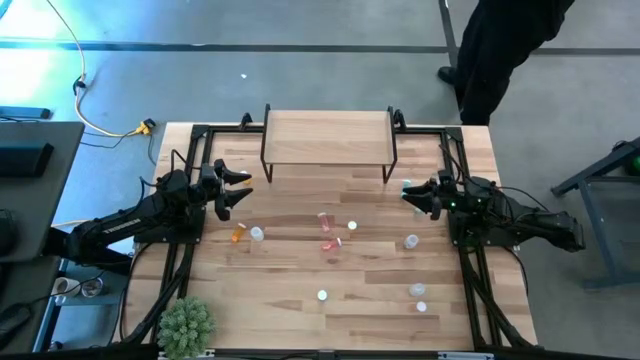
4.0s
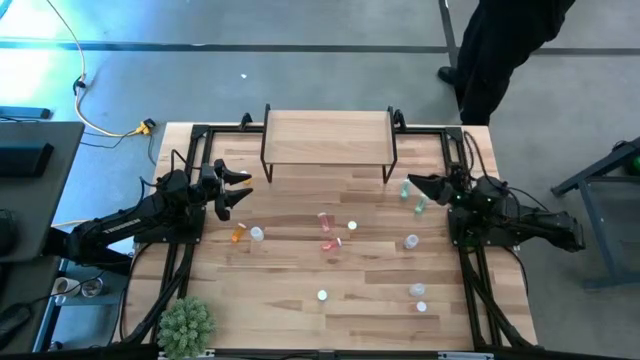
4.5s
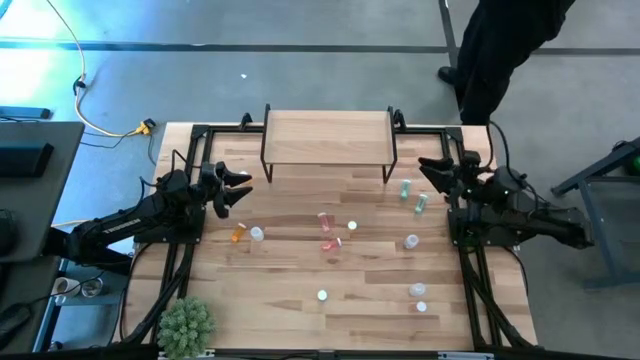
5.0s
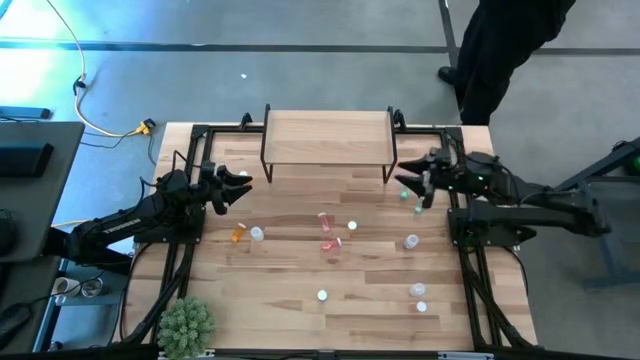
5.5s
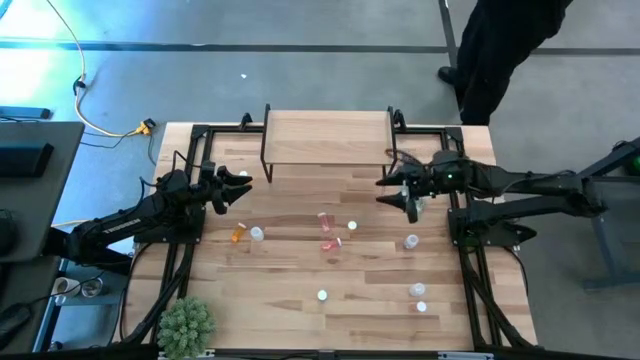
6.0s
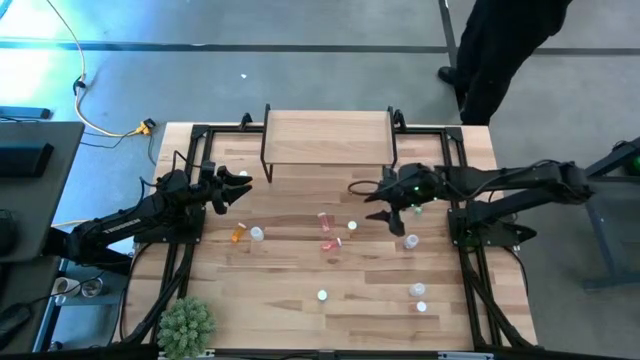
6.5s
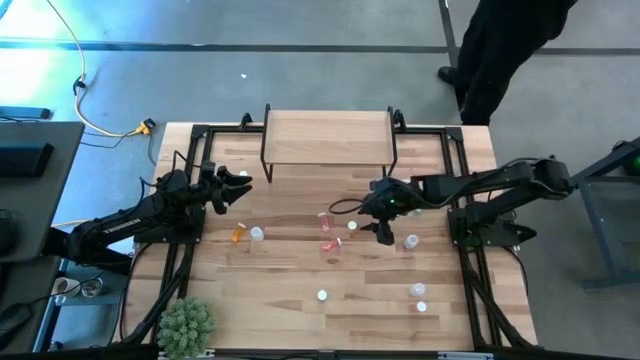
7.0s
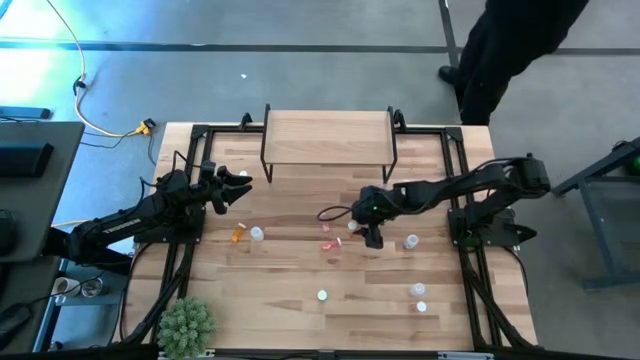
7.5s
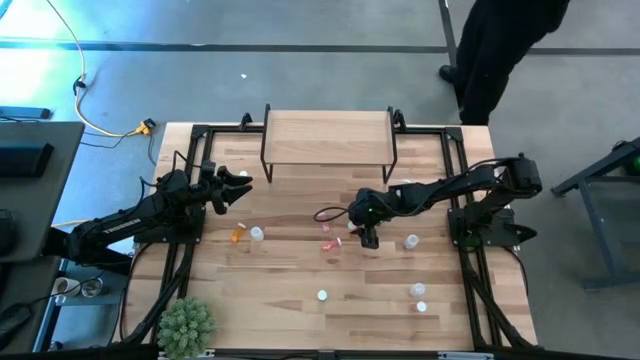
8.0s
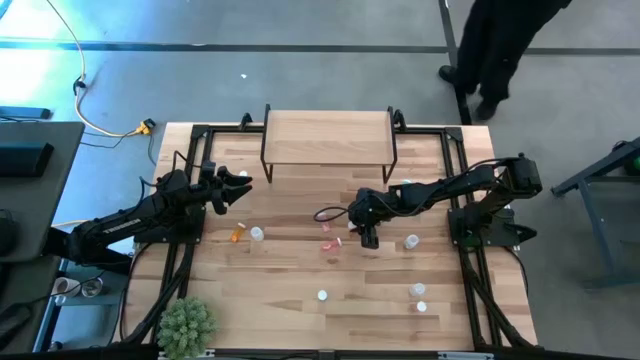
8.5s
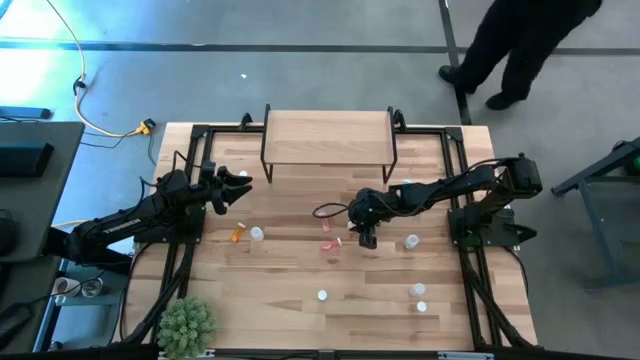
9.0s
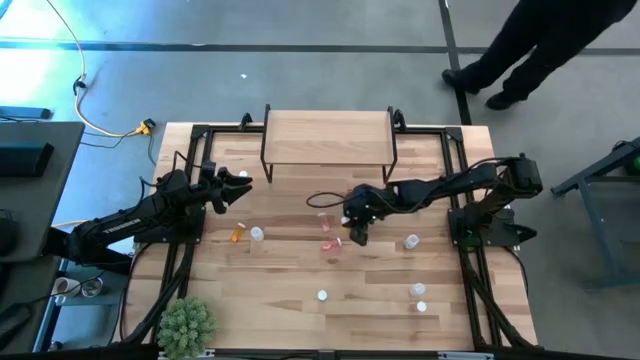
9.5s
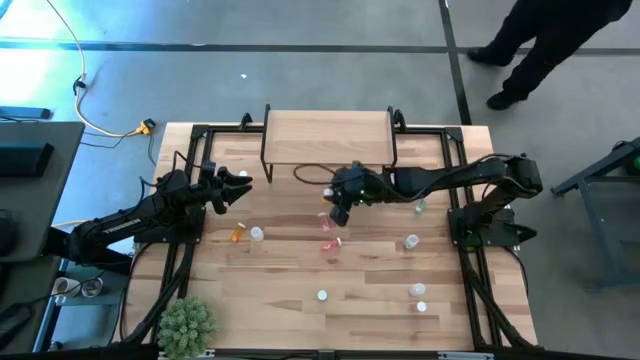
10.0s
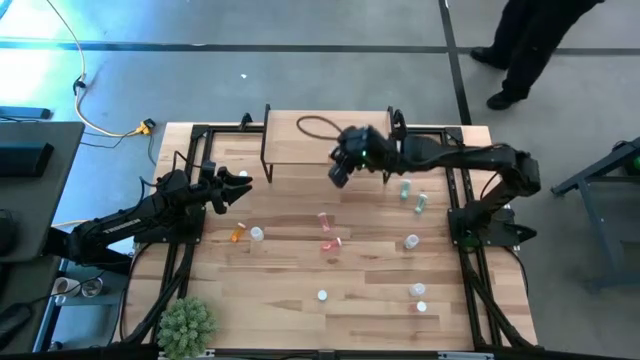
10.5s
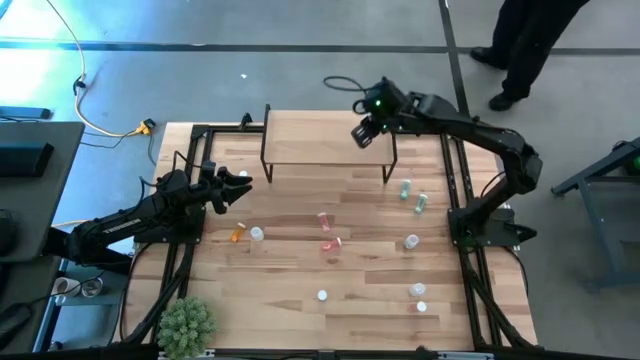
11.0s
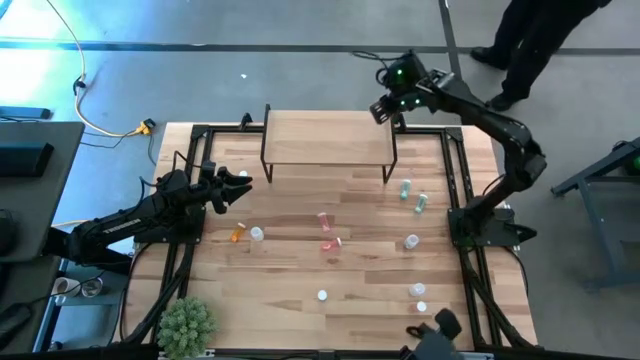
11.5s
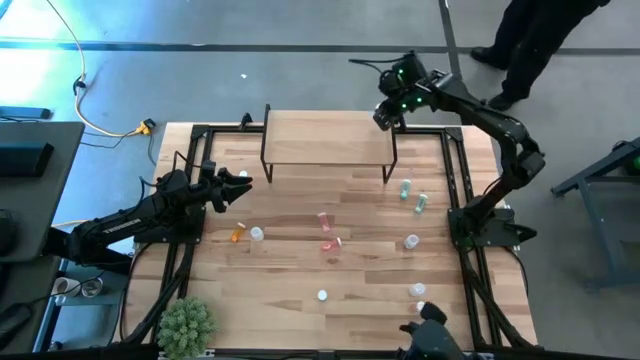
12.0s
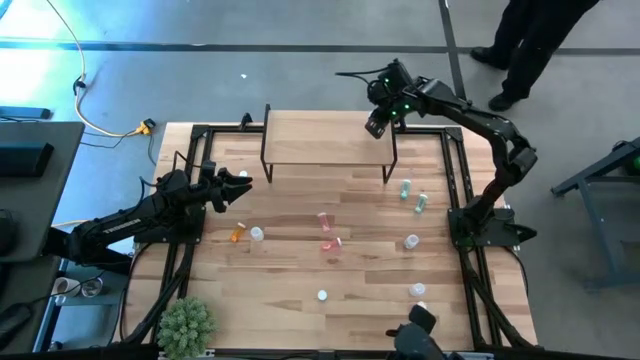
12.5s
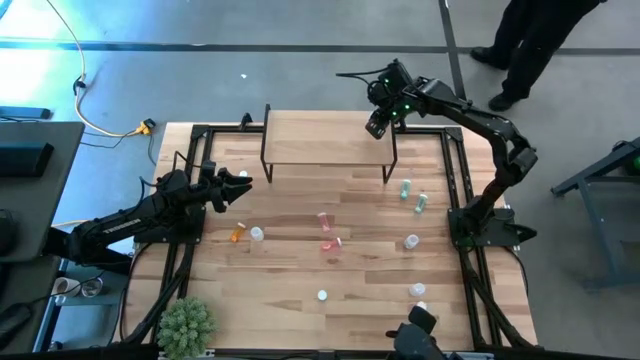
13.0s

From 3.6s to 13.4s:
Task: Pick and place medicine bottles onto shelf by color
Put the bottom right yellow pill bottle on the shelf

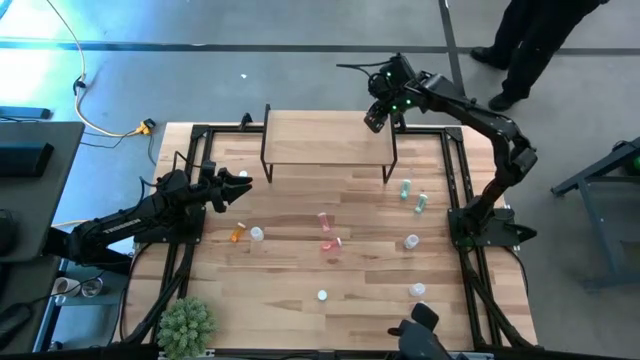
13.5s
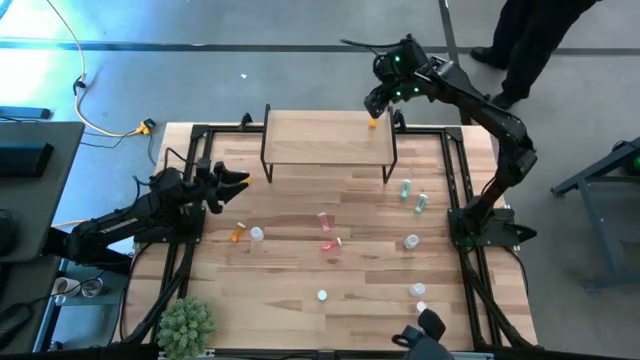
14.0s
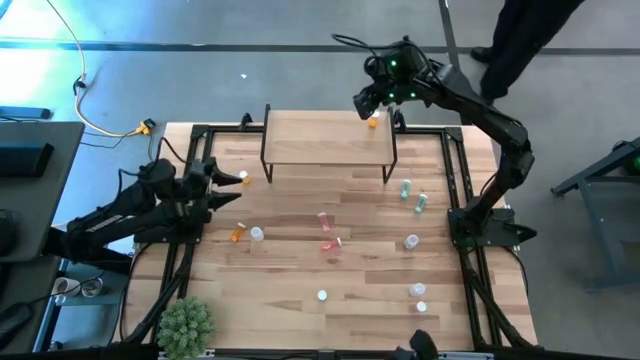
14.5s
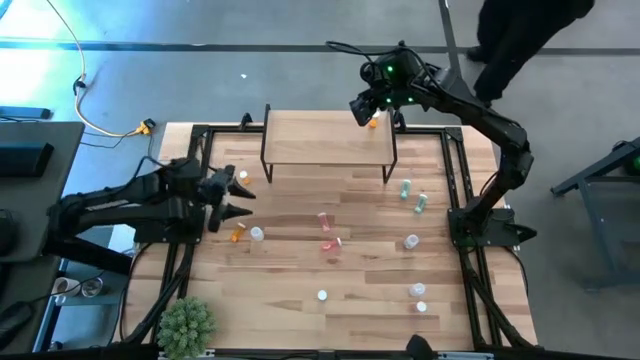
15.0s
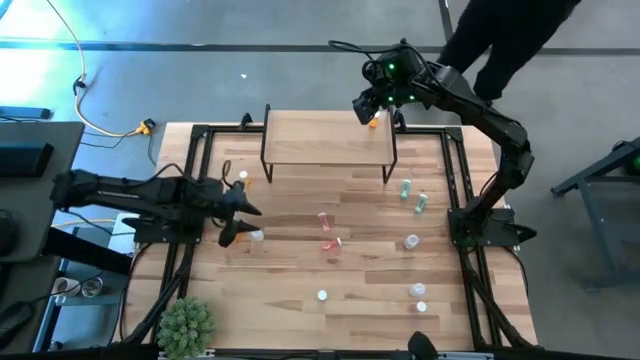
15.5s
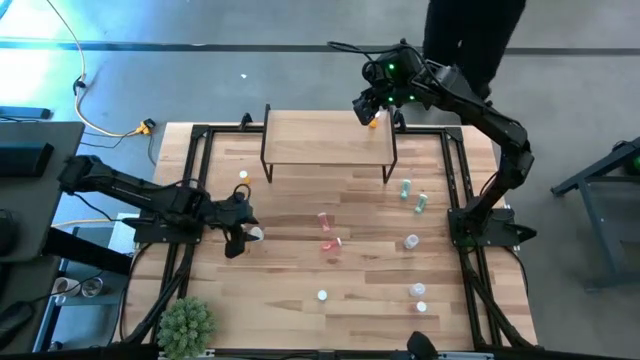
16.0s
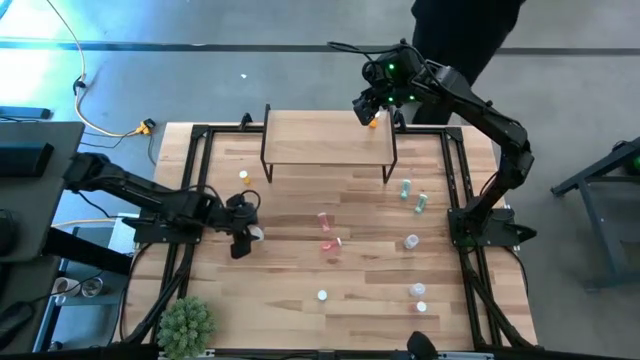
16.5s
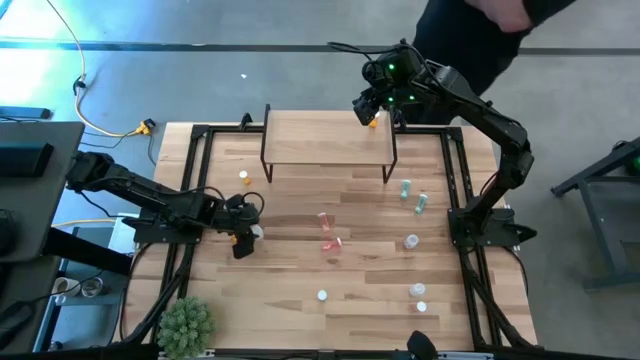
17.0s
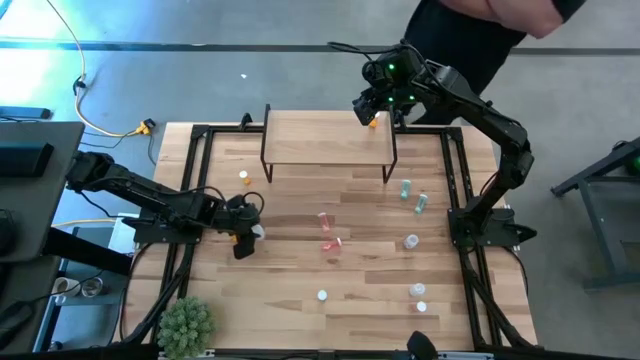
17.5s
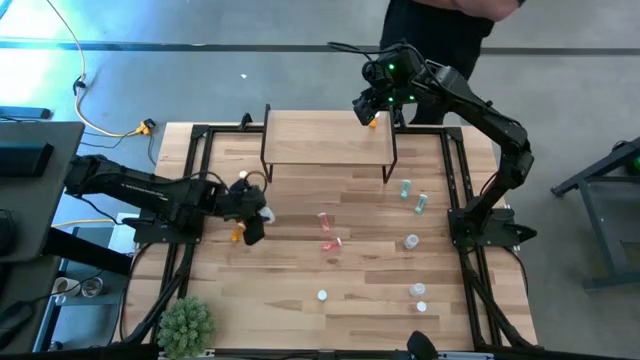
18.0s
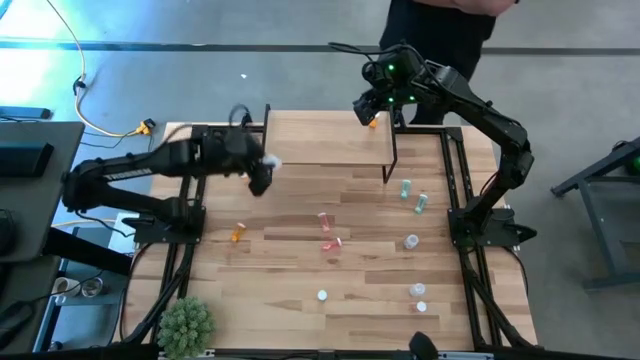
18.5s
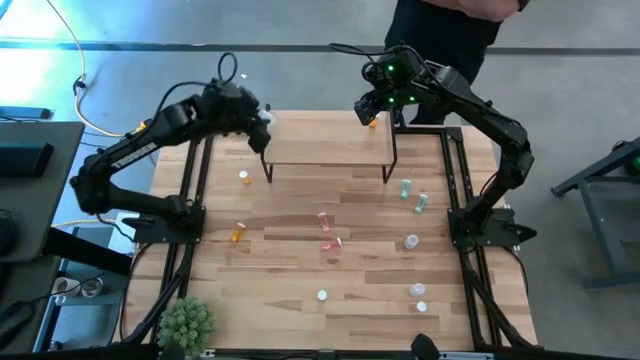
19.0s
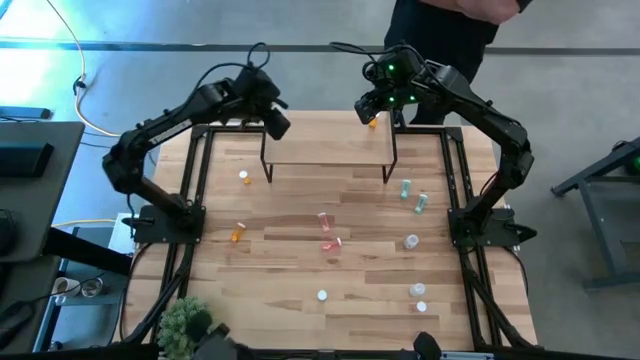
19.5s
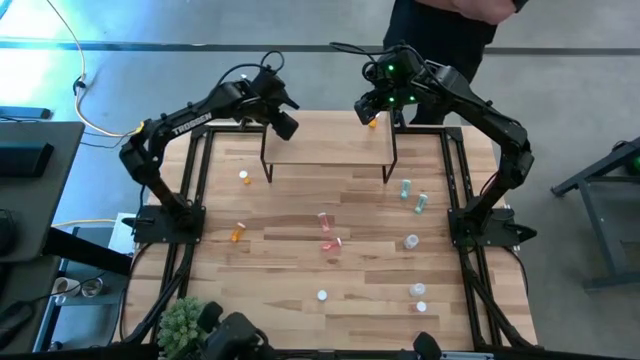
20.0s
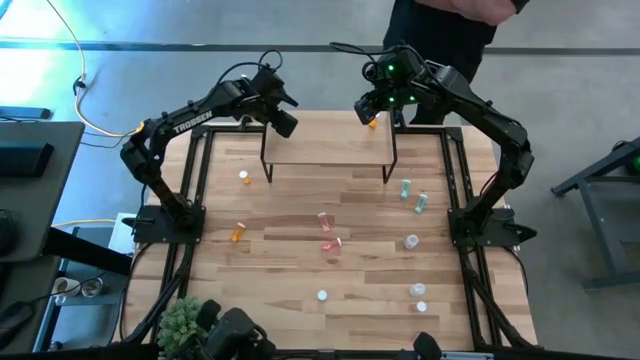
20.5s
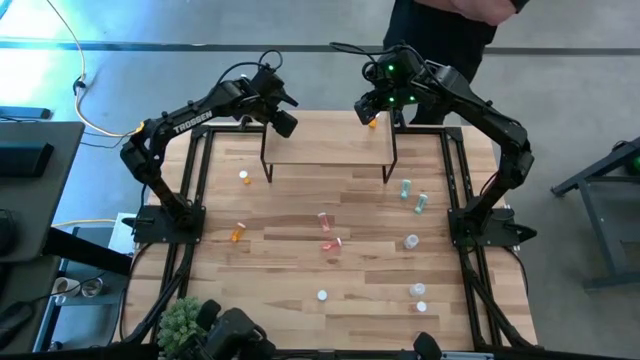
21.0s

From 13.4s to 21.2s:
Put the top left white pill bottle on the shelf

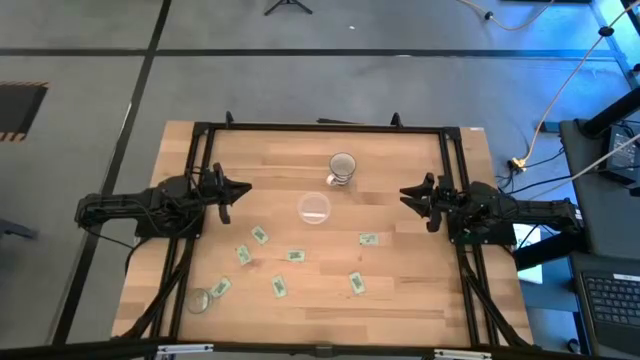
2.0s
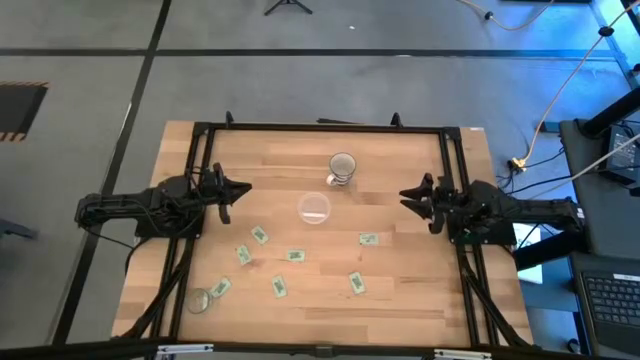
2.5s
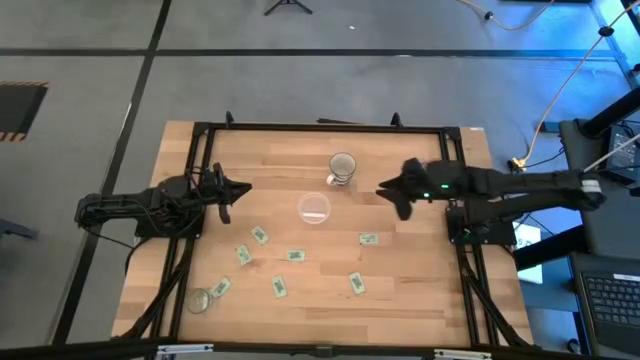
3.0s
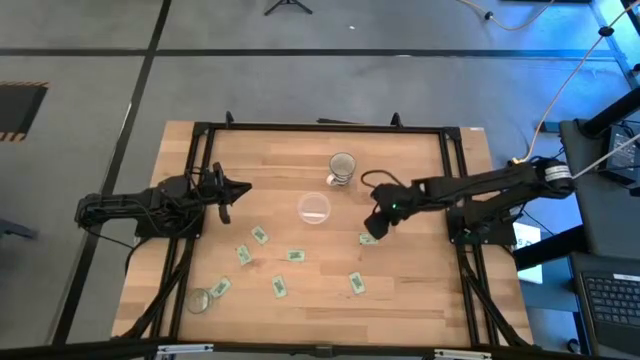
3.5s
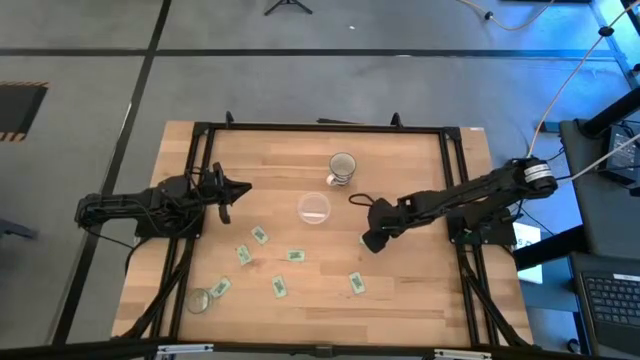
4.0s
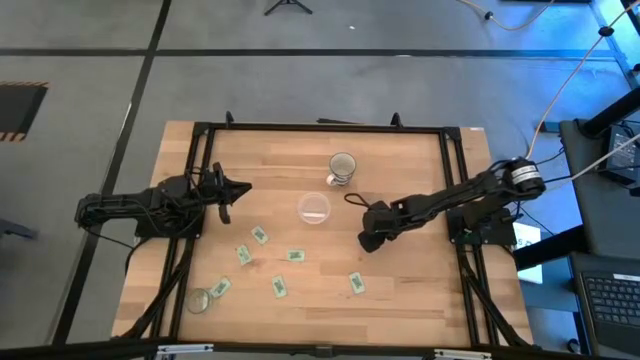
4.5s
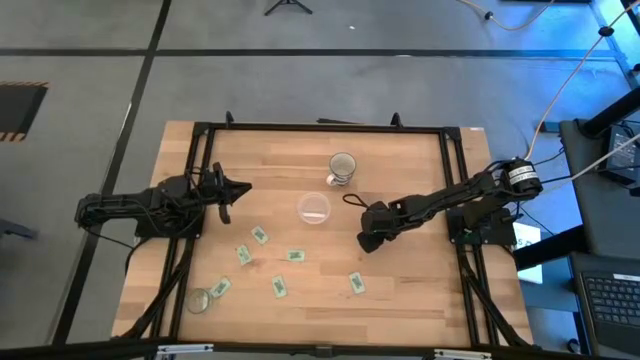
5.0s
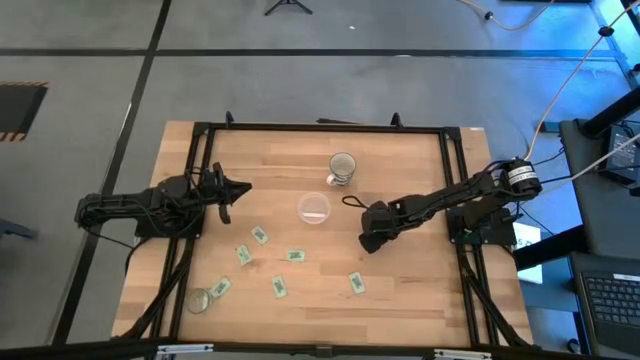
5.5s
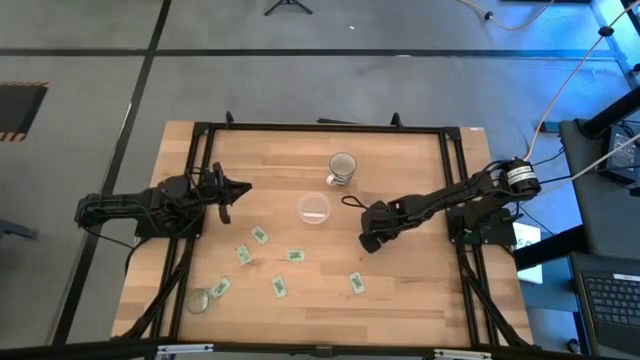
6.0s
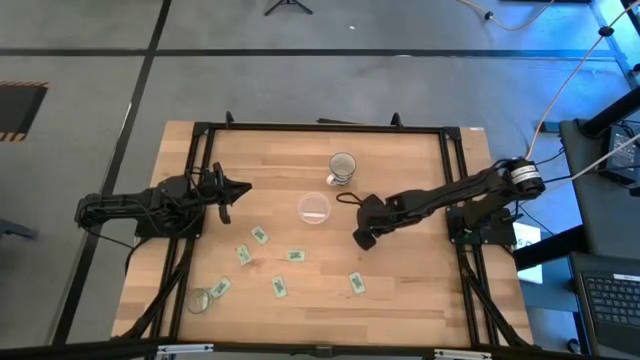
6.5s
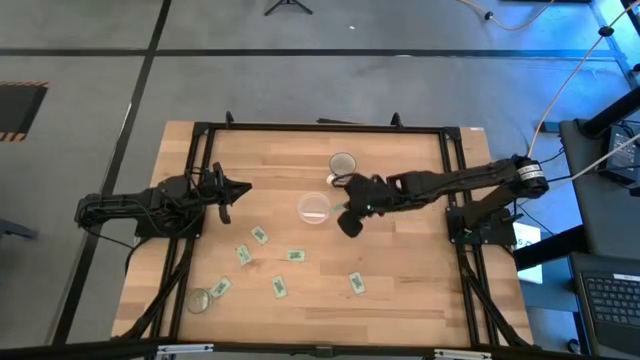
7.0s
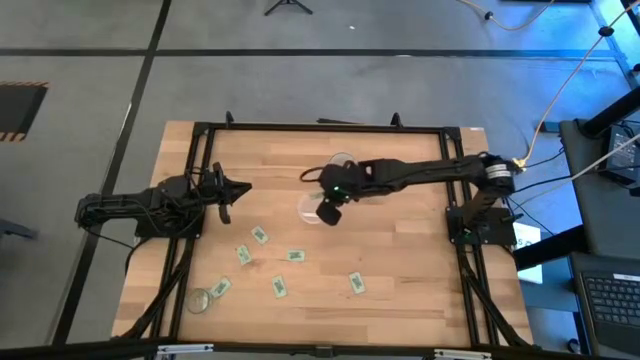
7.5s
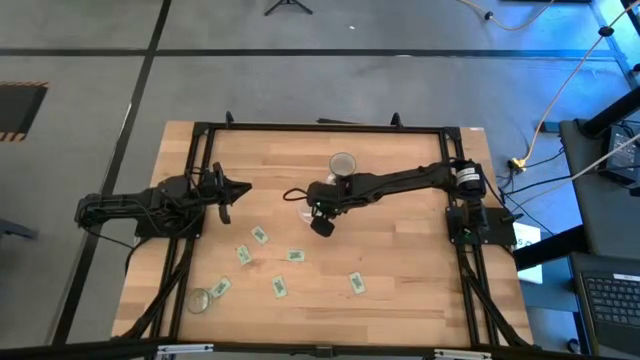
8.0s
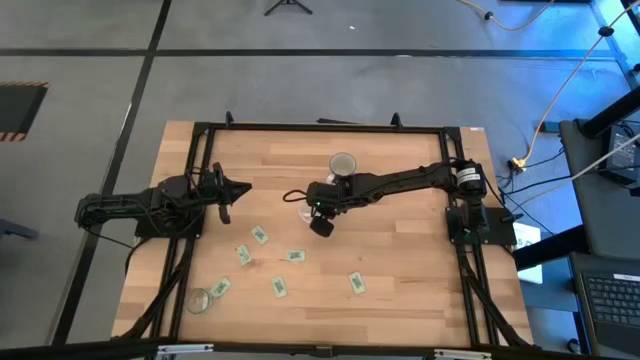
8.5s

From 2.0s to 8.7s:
Task: Pick and place Stevia / Truvia into bins
Put the stevia packet into the transparent container
